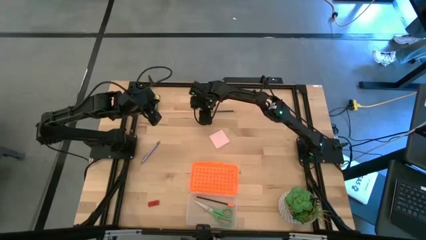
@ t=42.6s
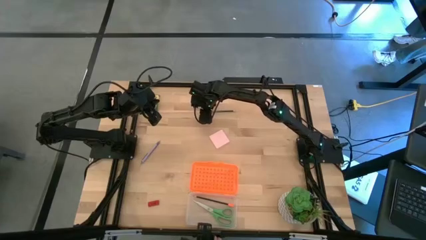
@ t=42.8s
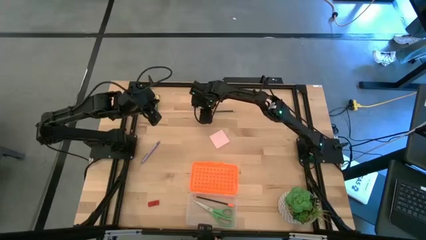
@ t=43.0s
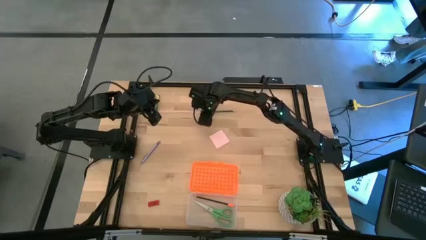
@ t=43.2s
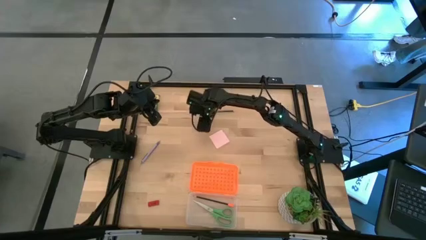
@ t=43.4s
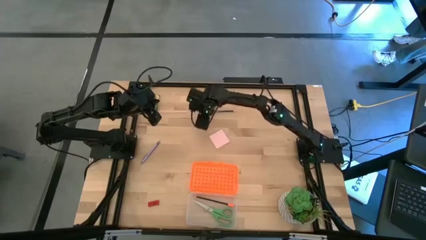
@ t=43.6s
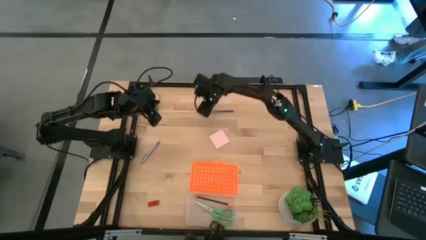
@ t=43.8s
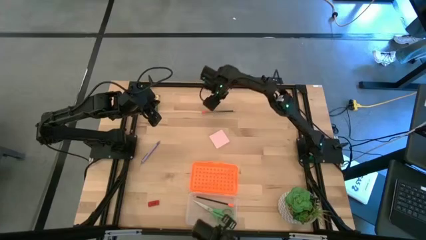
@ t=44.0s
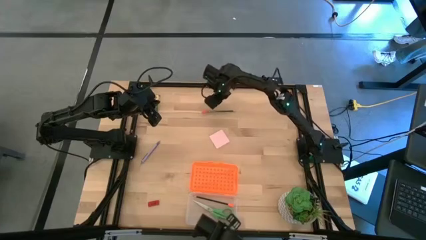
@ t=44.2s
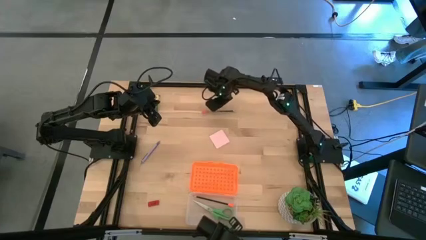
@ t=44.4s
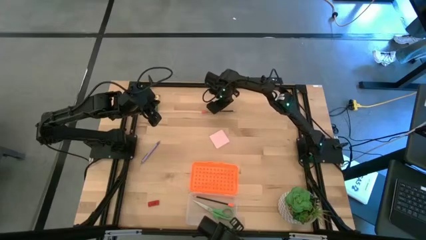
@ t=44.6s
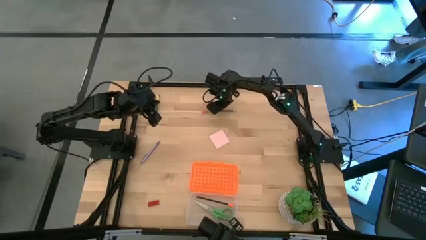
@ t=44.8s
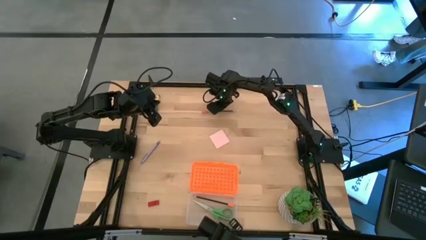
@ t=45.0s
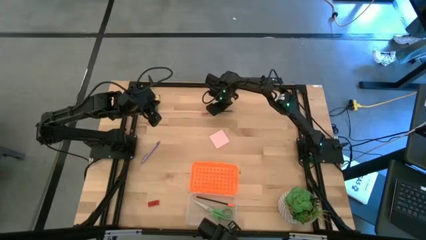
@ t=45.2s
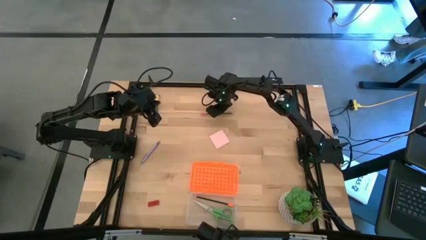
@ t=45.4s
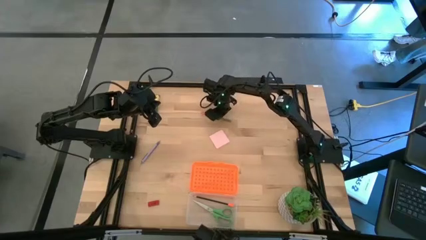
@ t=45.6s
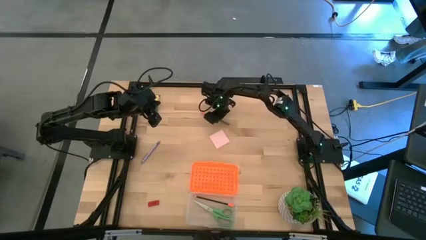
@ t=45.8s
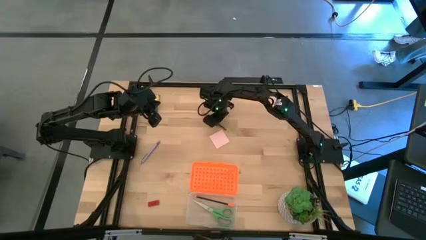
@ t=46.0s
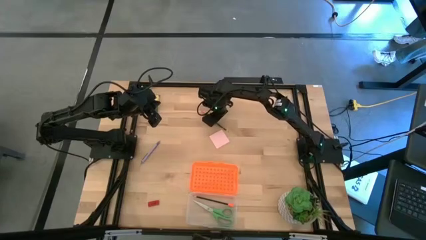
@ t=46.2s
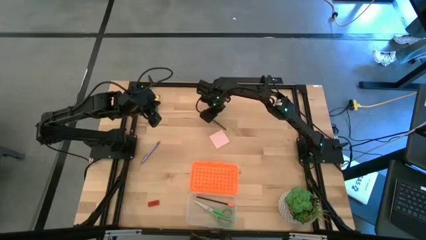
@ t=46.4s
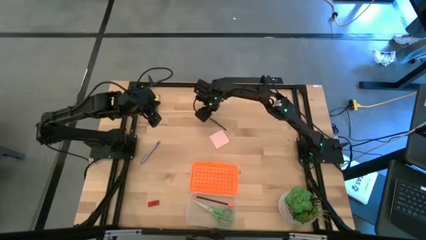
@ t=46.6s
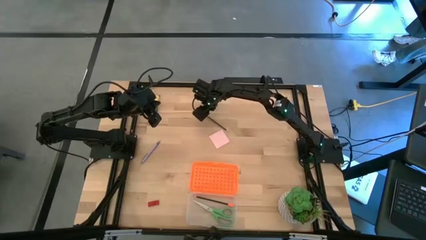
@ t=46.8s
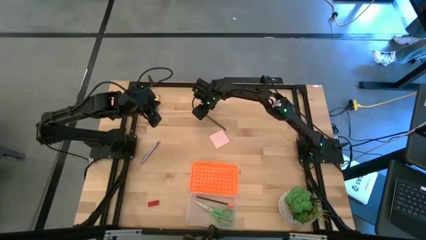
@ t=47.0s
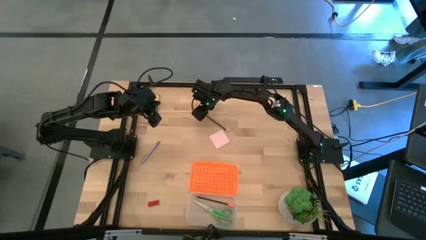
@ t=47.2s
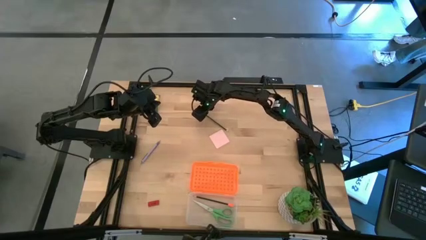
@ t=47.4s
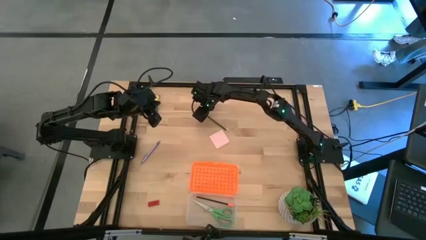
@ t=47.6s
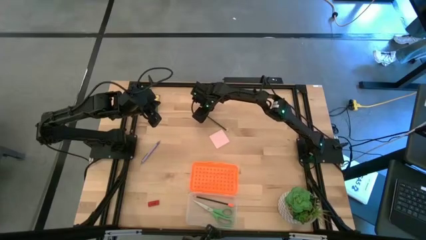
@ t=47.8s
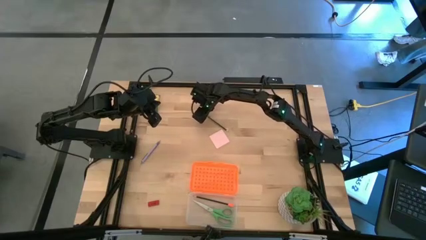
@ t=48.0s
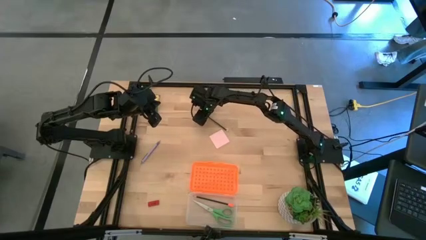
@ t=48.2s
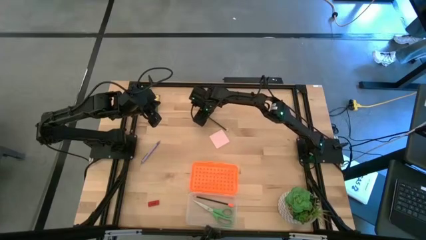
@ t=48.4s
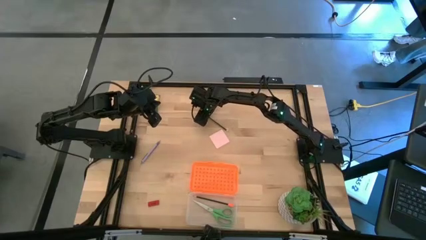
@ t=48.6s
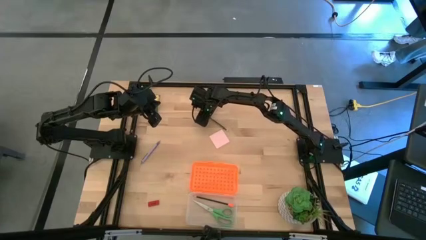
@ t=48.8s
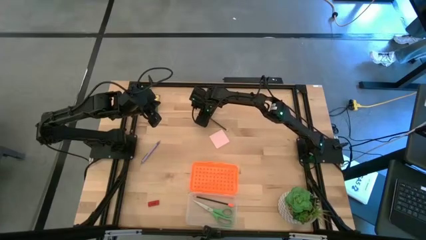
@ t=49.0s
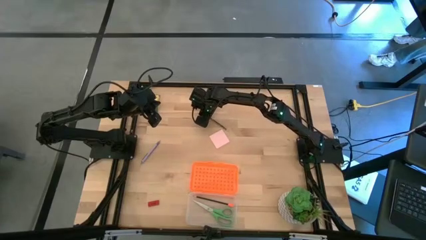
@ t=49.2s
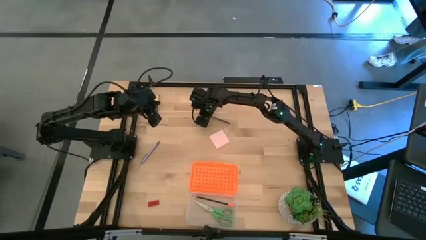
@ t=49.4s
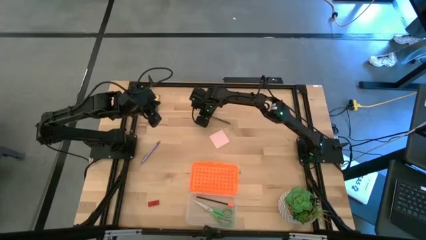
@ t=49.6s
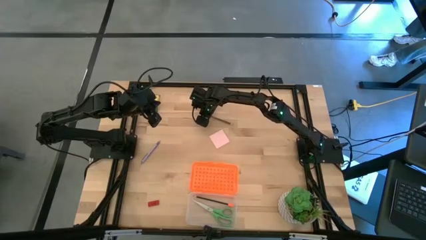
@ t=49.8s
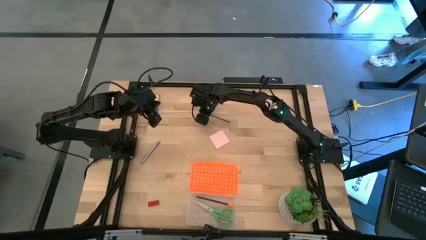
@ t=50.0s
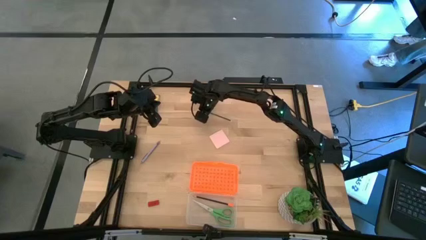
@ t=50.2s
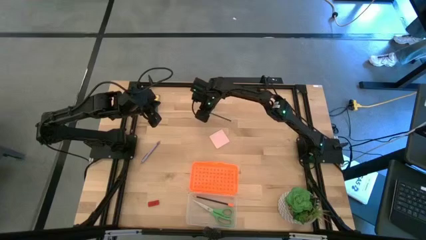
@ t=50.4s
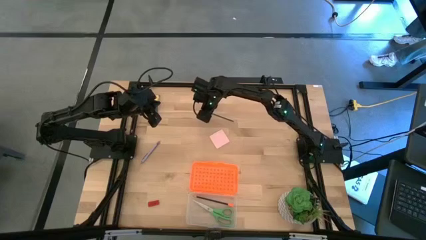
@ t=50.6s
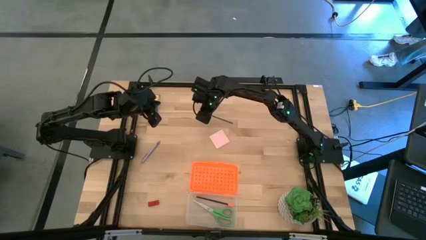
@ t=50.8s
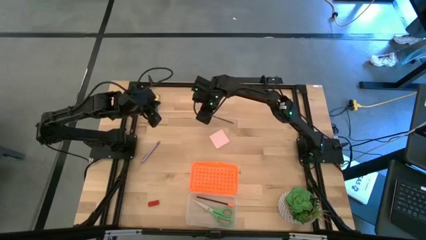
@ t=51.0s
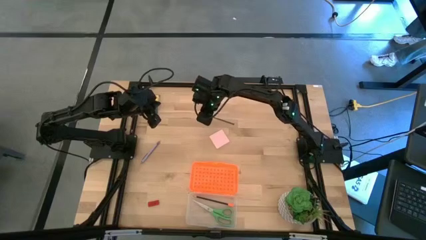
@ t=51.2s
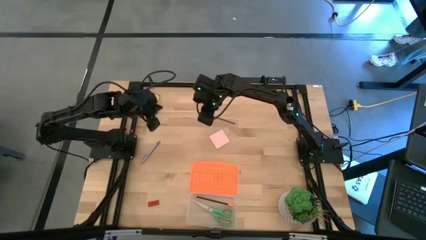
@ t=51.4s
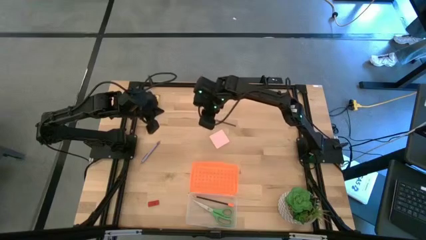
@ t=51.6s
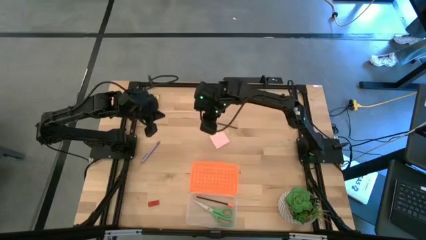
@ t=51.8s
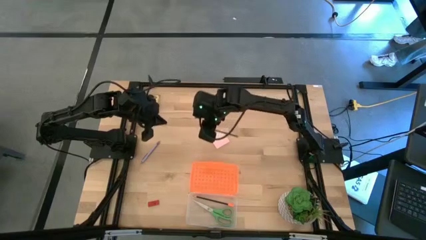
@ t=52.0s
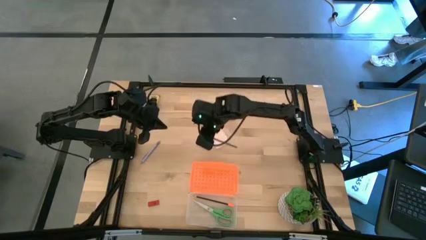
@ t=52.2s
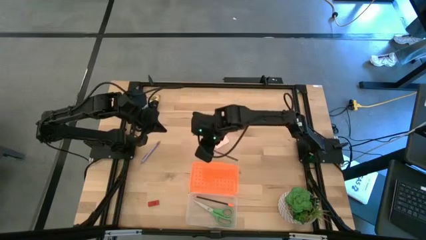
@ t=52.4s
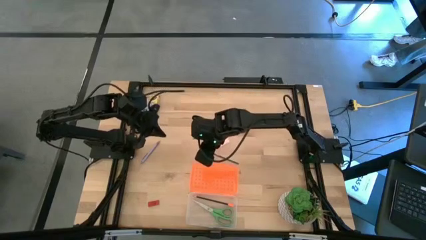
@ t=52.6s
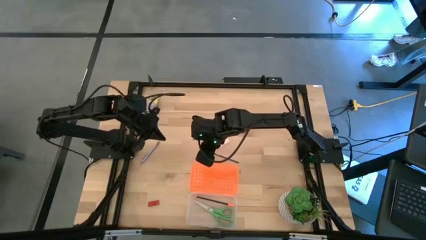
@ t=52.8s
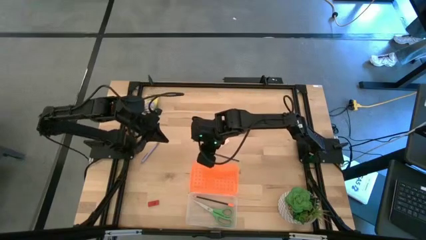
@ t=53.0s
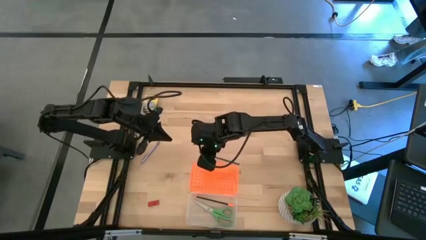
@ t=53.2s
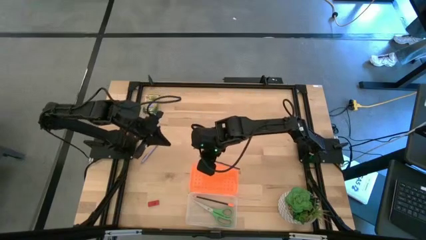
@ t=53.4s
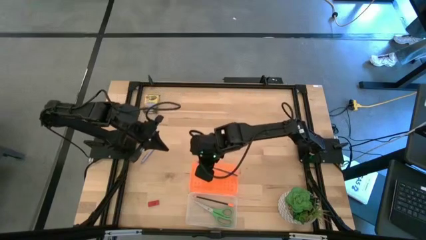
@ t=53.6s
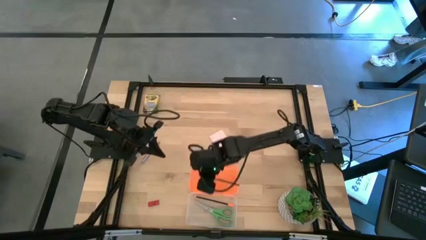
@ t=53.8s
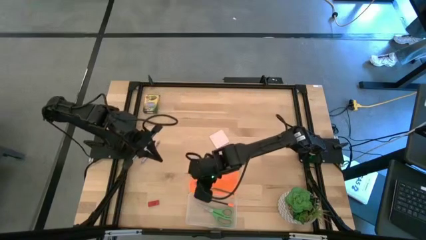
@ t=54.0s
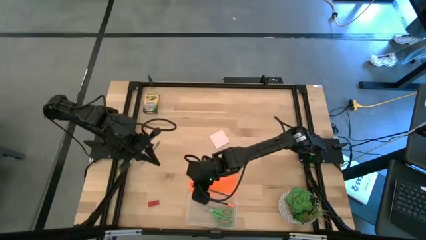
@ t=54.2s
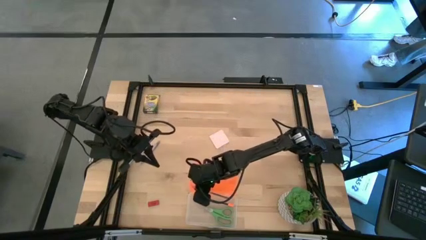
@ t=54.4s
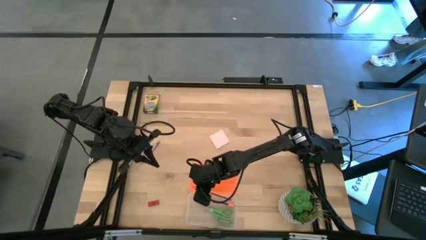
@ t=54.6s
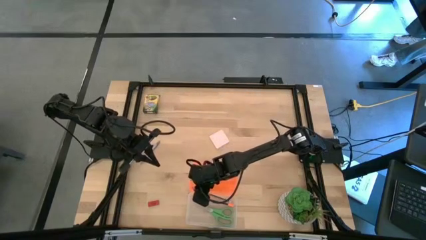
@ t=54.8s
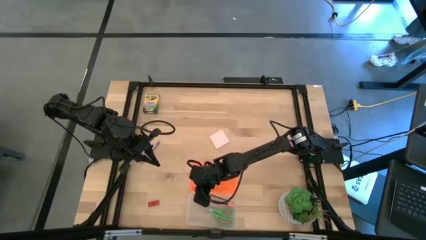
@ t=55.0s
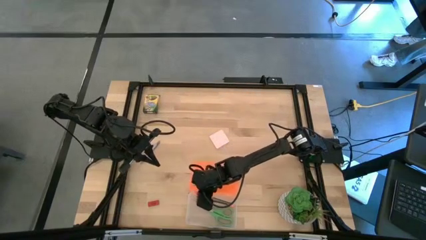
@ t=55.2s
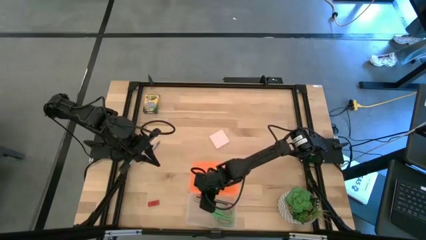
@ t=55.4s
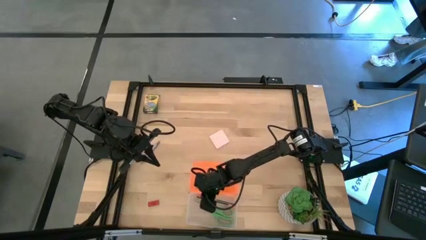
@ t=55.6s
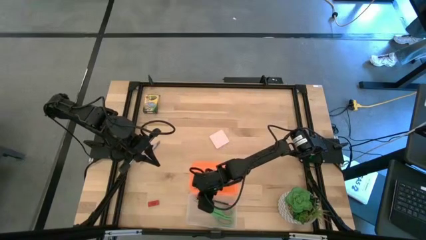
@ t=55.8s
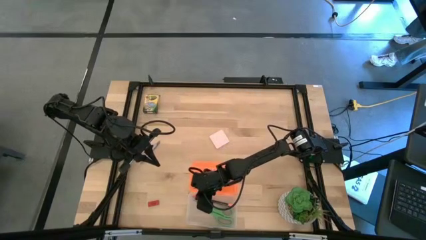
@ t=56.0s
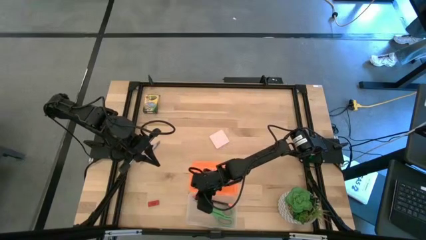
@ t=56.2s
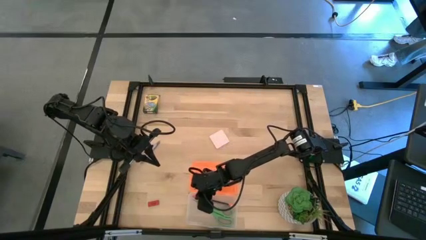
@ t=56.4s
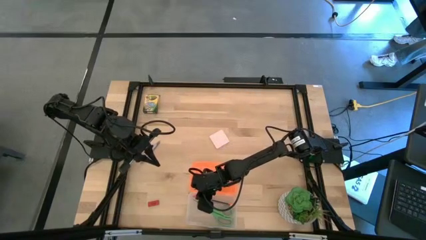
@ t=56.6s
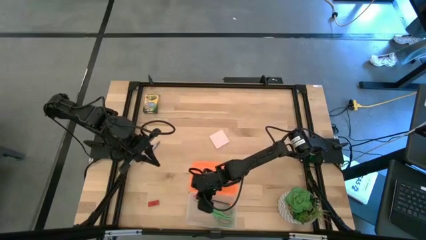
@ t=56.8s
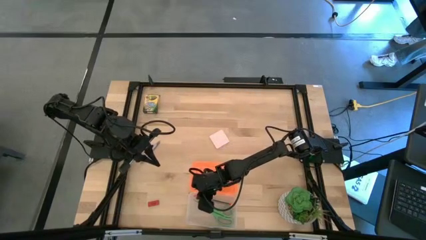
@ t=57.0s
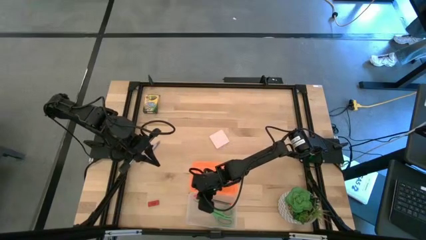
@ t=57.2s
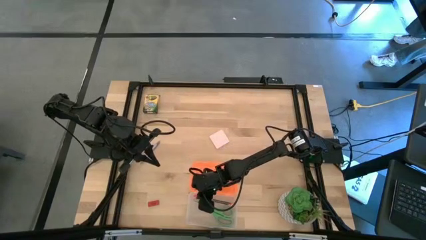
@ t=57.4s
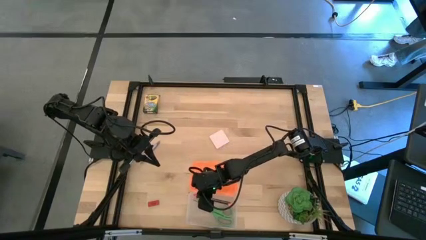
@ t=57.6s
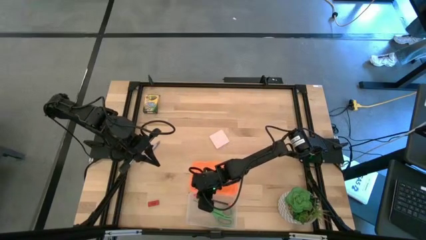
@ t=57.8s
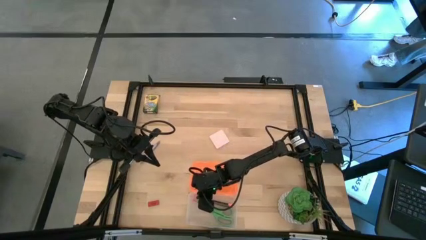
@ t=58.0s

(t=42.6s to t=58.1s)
Task: Pack school essentials
Put the dark blue pencil into the orange supply box
